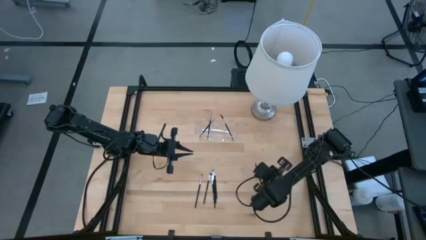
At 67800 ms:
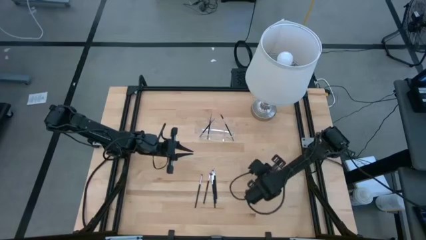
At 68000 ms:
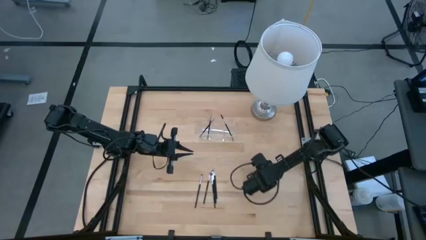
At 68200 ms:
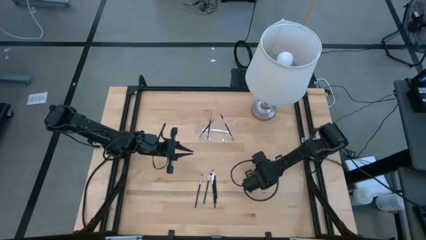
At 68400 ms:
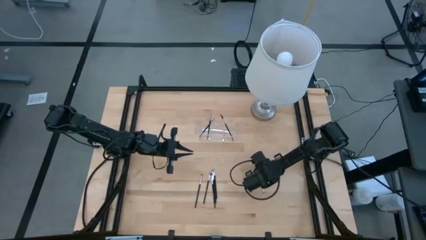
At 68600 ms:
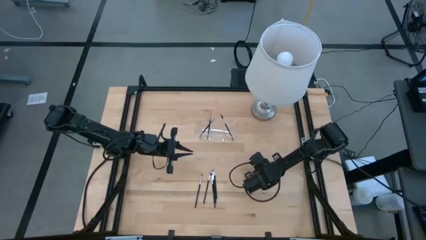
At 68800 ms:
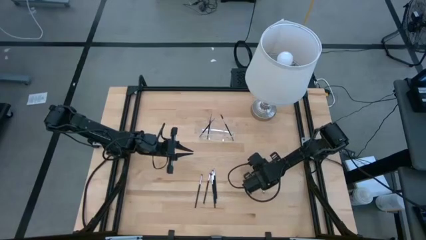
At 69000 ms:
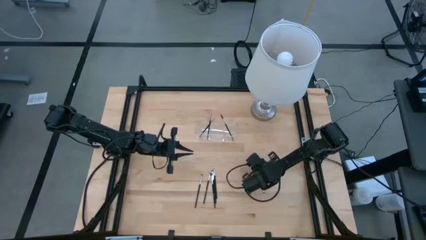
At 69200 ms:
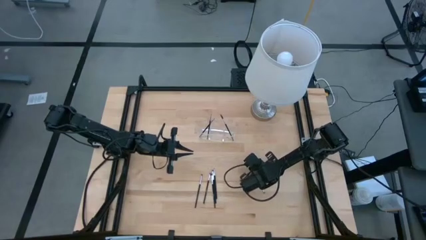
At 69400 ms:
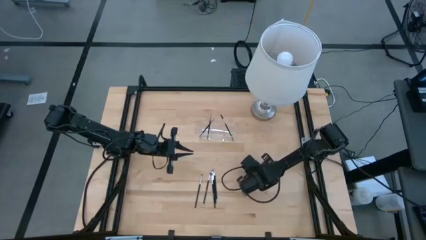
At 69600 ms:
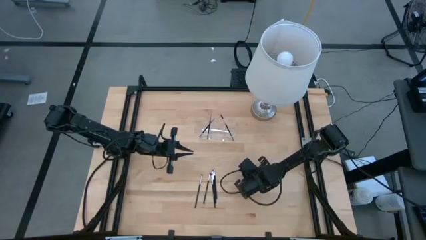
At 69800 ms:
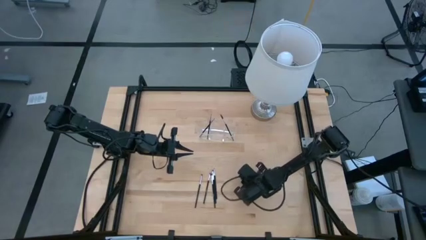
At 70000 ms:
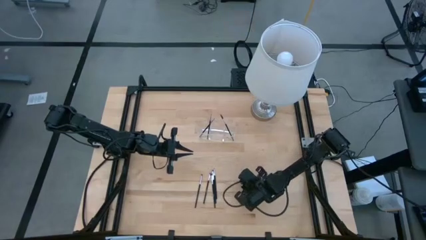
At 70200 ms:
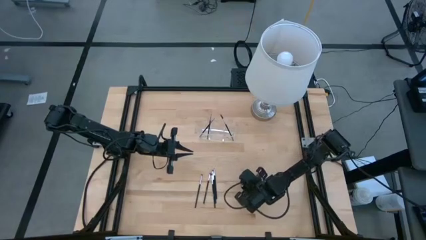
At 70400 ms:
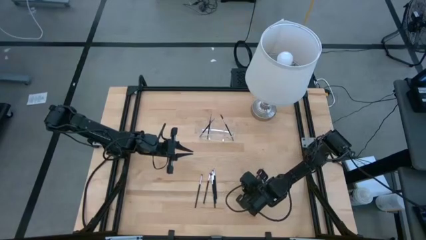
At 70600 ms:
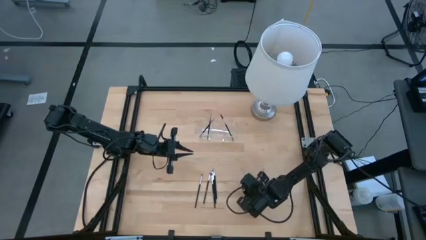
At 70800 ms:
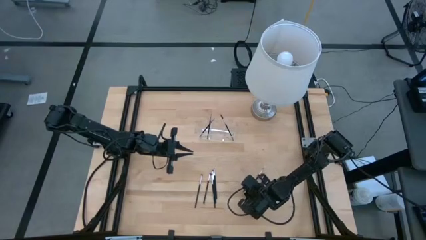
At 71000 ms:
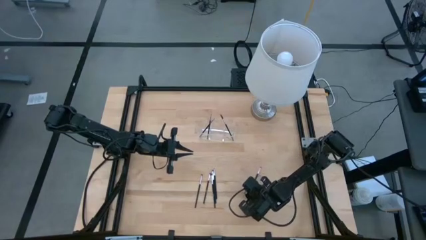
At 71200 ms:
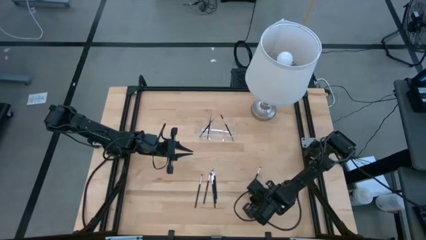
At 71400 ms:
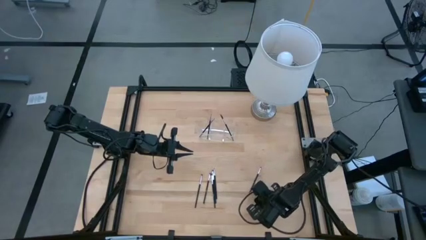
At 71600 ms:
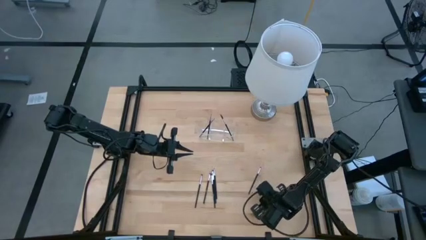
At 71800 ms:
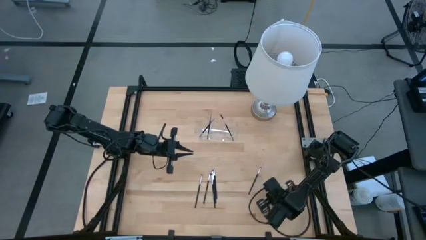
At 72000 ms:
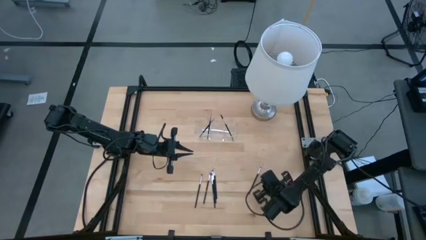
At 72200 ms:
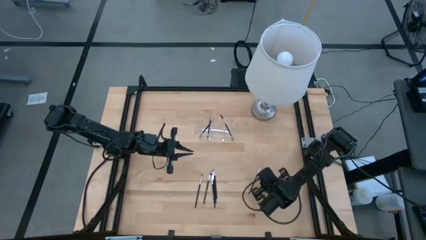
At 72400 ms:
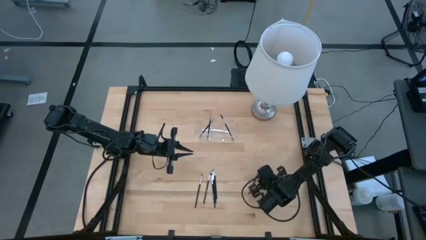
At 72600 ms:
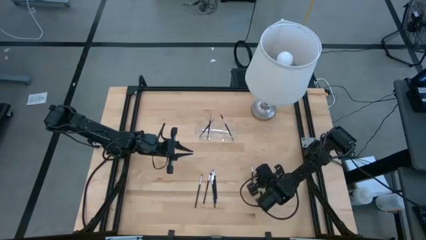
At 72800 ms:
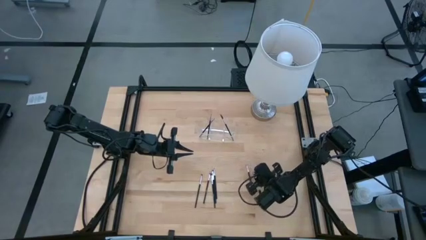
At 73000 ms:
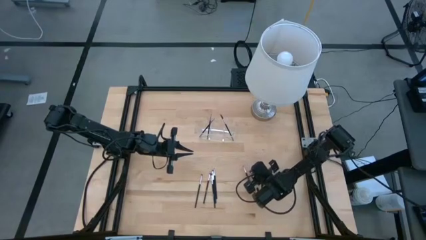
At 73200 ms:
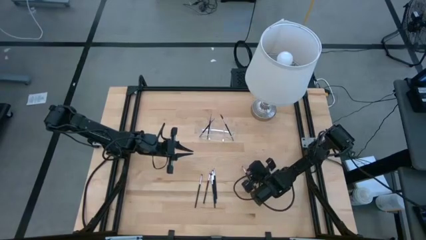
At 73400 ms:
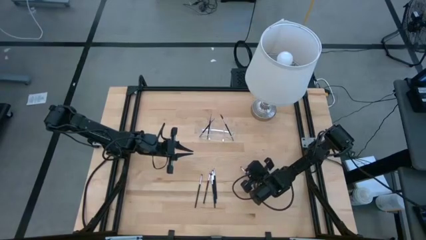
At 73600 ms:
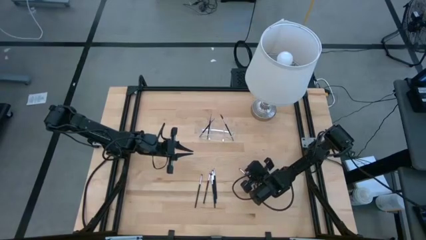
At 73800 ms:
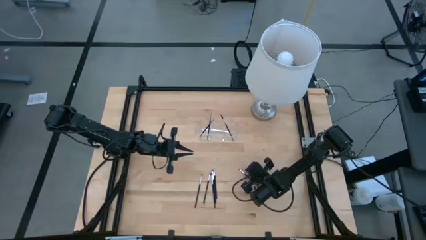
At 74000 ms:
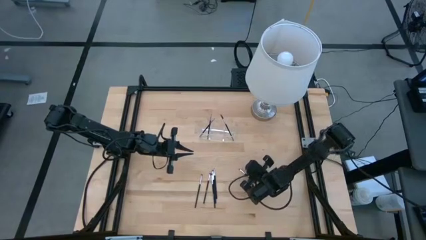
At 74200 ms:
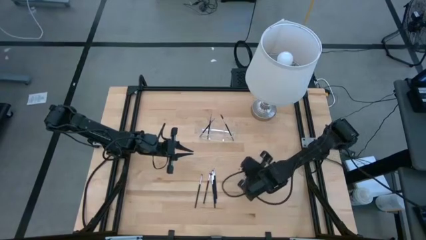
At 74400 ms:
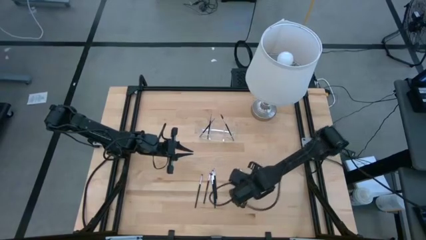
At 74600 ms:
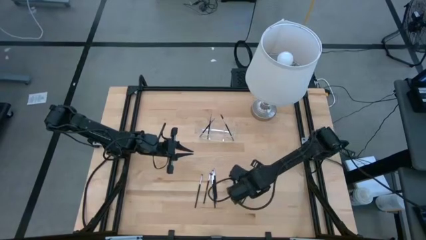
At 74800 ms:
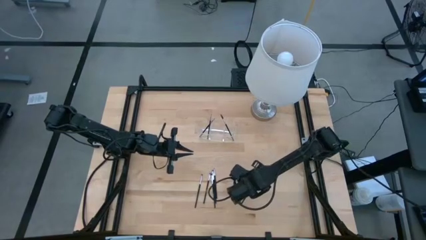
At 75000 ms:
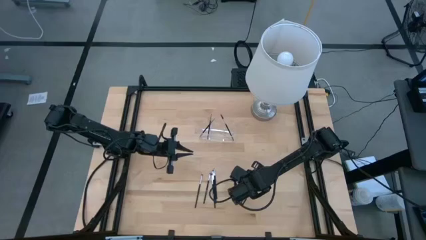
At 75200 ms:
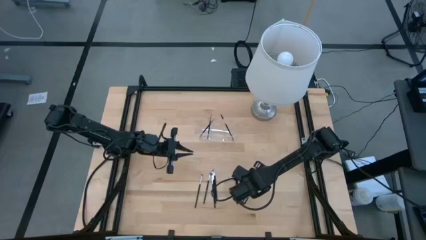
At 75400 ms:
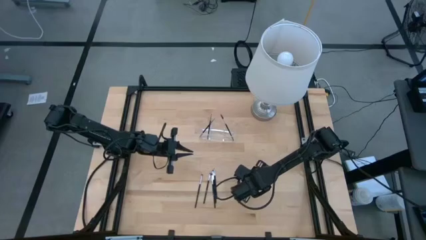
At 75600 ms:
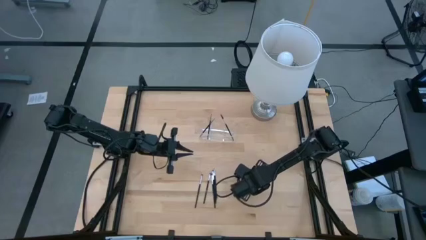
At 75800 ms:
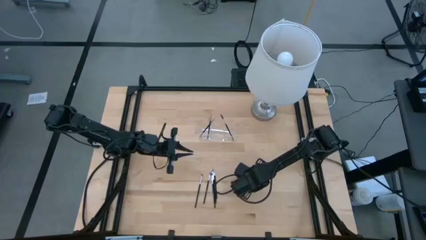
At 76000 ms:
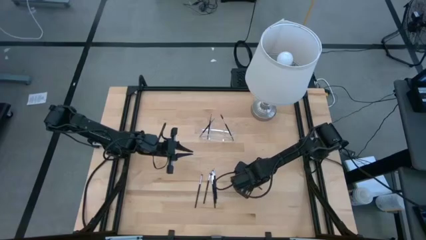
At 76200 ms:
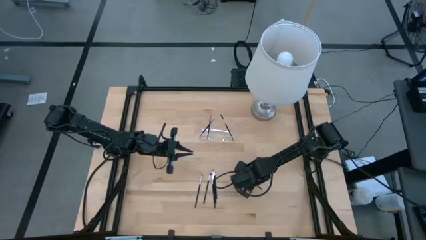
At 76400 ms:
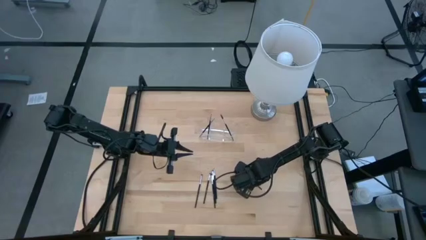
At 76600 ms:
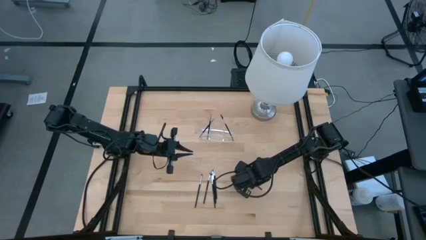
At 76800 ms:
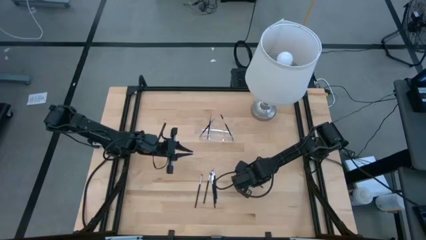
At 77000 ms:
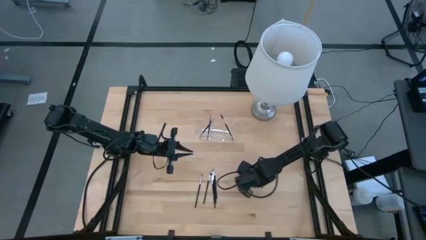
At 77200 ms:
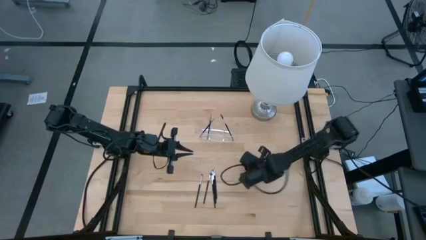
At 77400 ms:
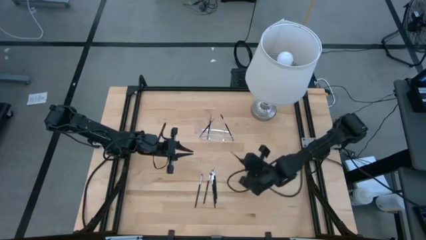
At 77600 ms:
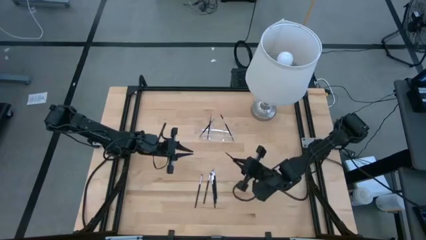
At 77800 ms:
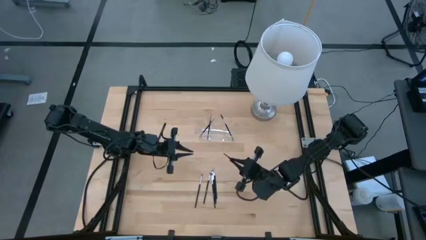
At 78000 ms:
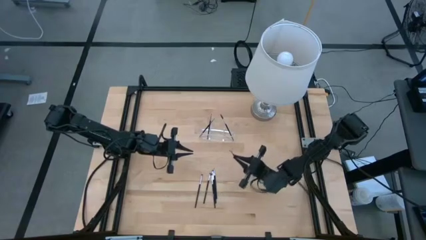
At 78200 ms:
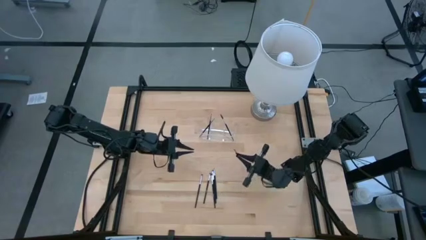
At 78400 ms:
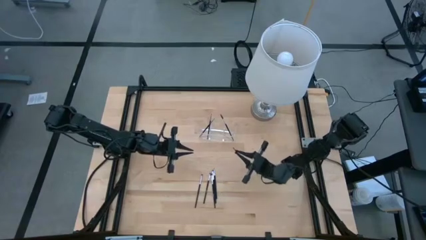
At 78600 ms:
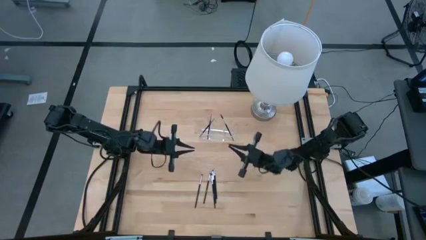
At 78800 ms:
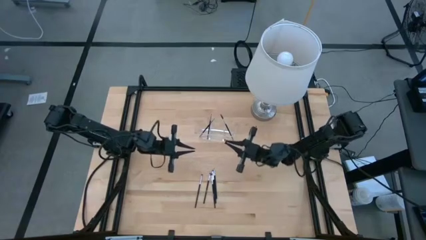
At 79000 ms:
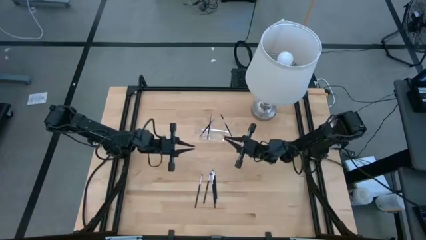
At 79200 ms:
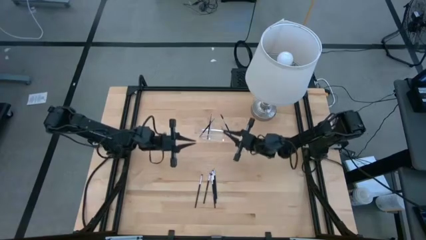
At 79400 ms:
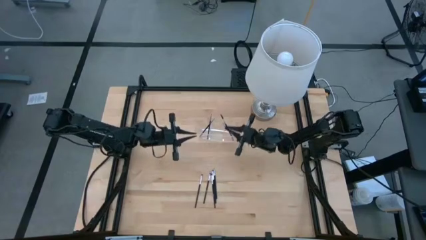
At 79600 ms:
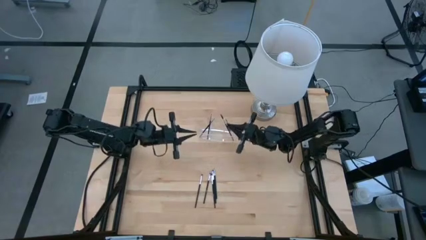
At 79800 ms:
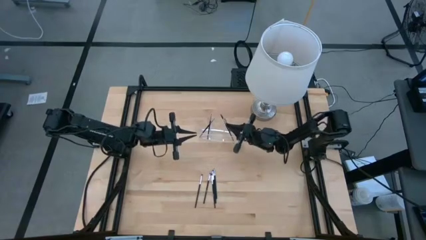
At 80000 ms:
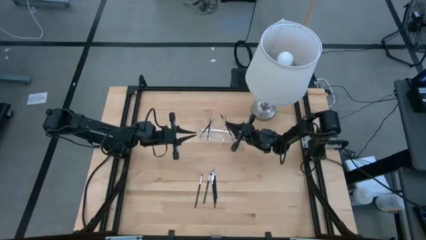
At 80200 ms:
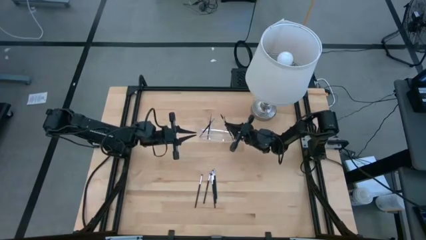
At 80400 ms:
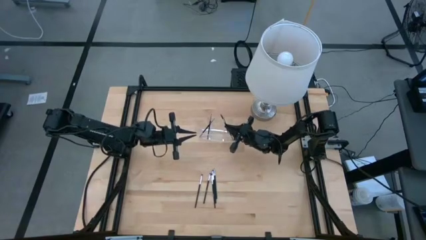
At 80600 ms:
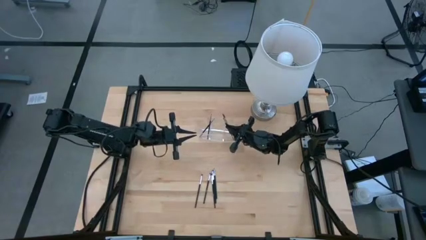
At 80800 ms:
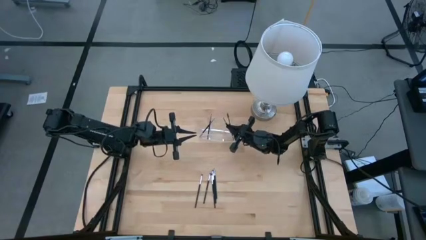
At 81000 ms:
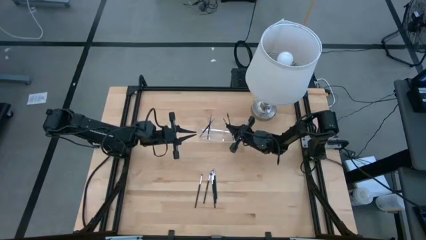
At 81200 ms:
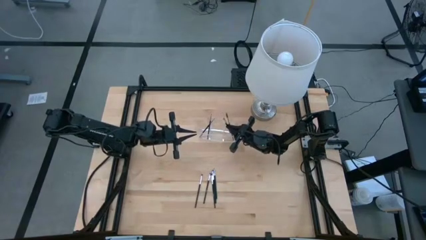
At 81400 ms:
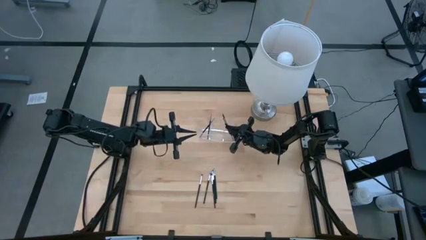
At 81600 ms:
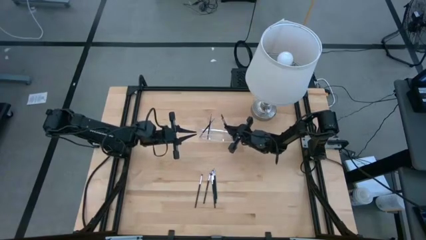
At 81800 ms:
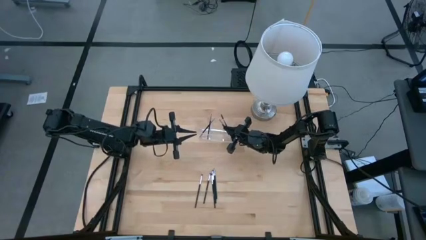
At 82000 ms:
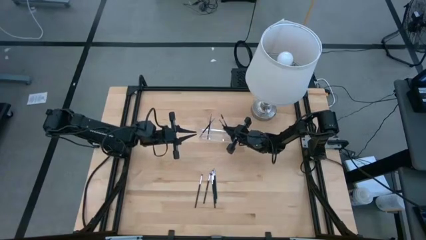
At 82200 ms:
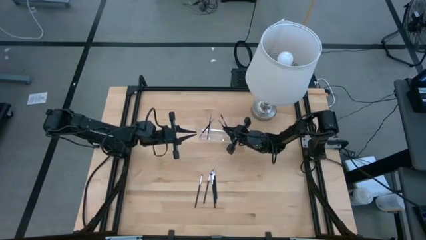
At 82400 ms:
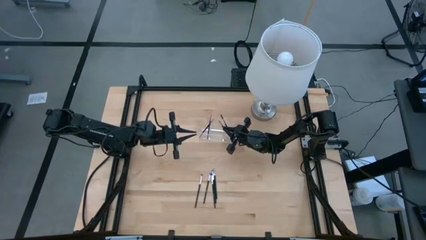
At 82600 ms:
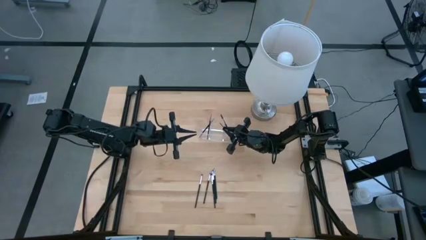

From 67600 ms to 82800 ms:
Task: Put items in baskets/containers
Put the black liner brush transparent organizer
